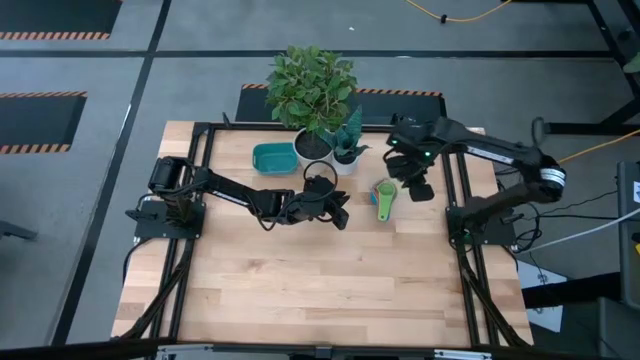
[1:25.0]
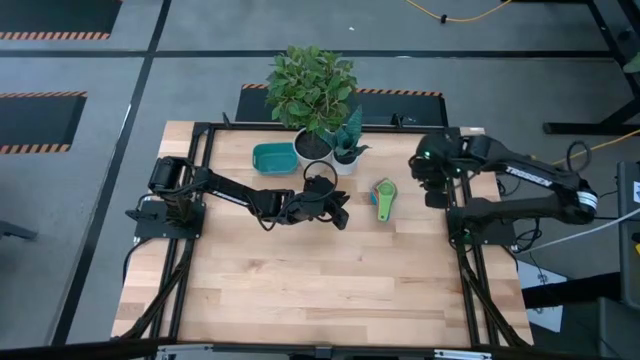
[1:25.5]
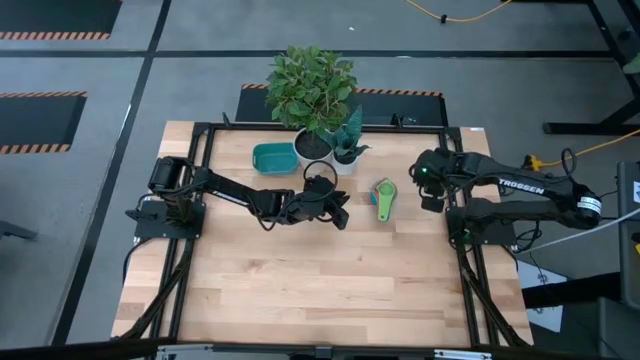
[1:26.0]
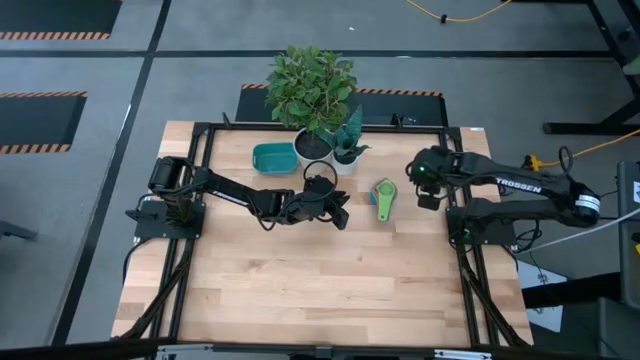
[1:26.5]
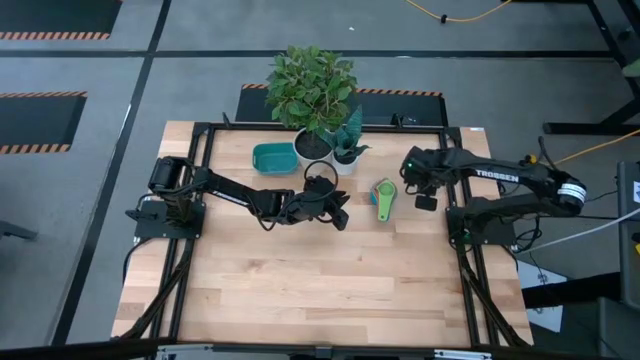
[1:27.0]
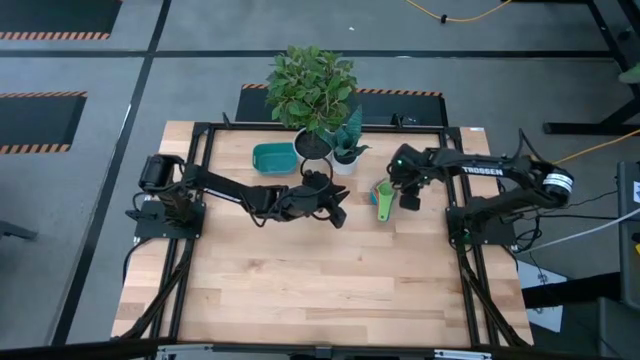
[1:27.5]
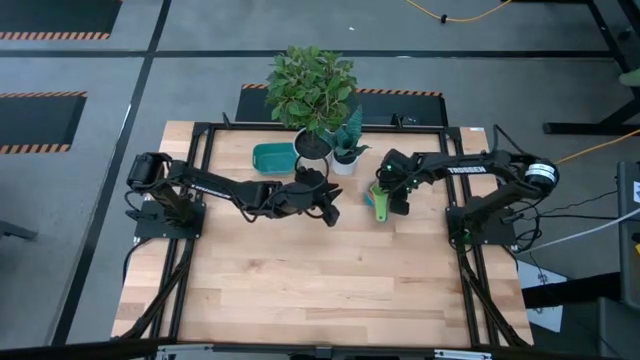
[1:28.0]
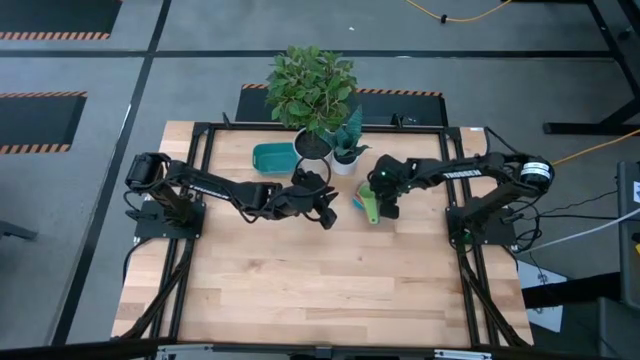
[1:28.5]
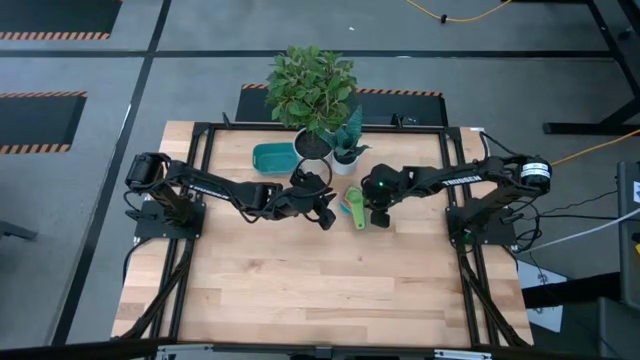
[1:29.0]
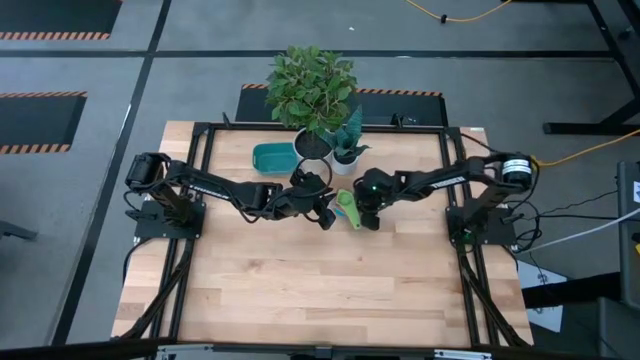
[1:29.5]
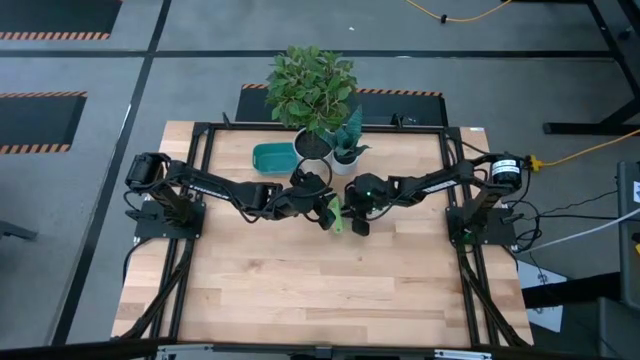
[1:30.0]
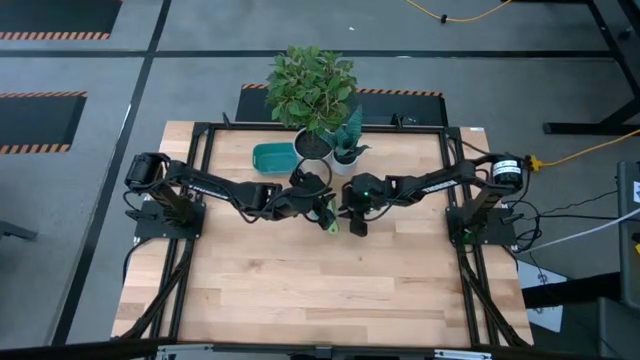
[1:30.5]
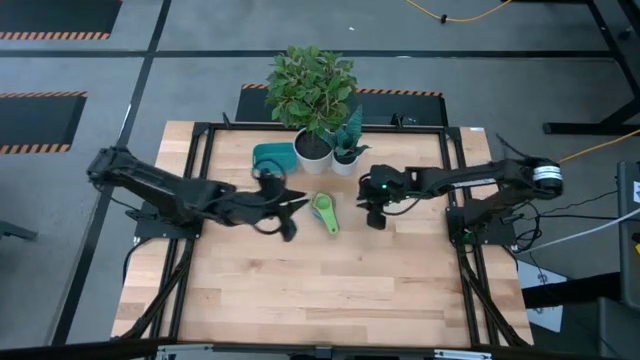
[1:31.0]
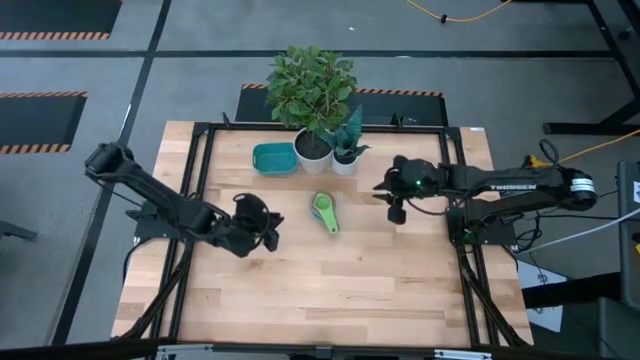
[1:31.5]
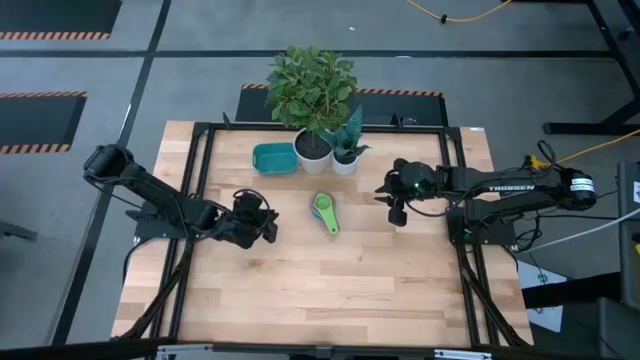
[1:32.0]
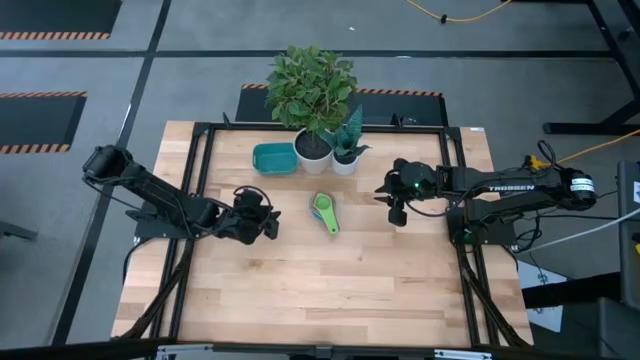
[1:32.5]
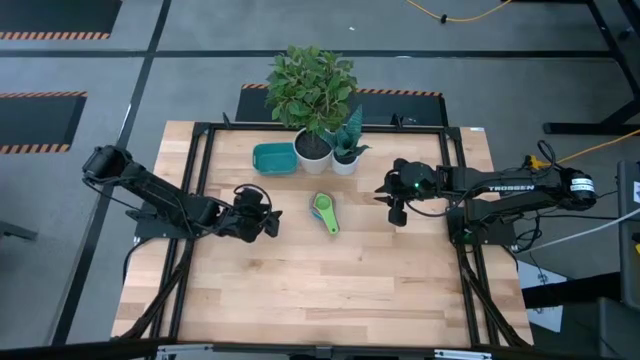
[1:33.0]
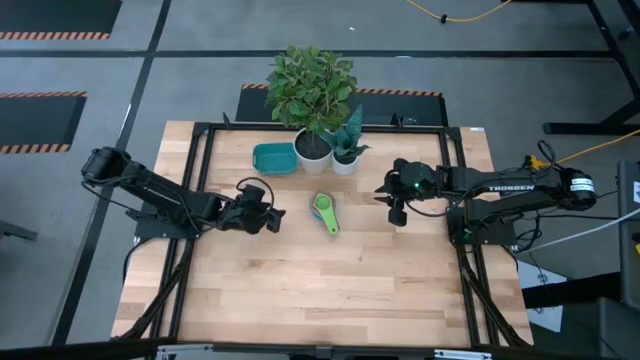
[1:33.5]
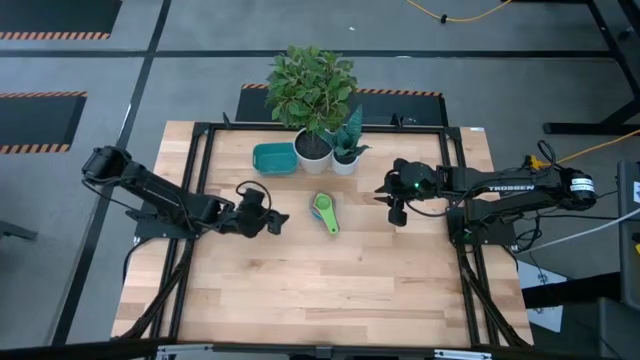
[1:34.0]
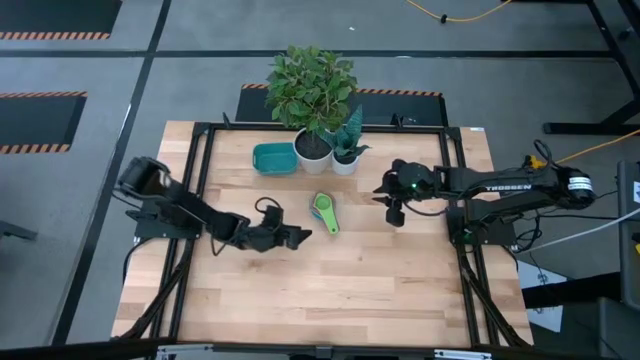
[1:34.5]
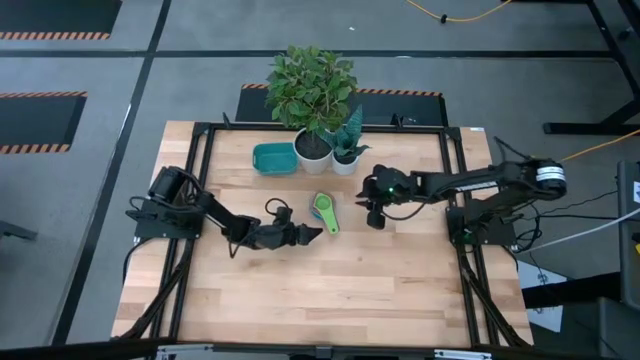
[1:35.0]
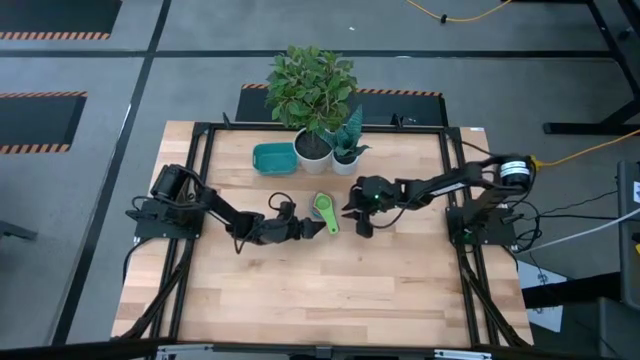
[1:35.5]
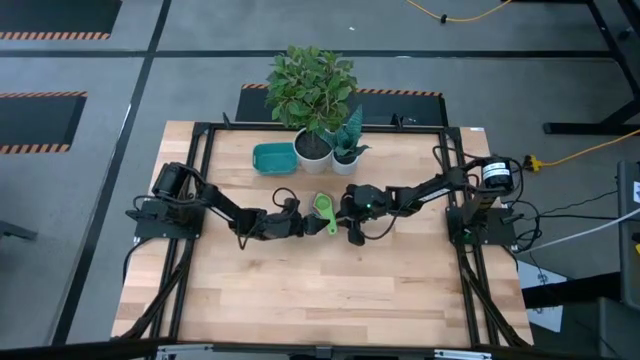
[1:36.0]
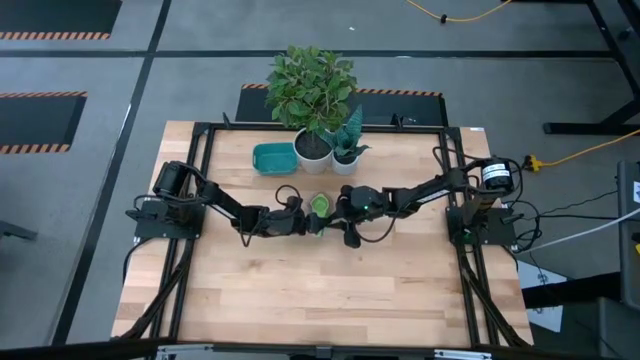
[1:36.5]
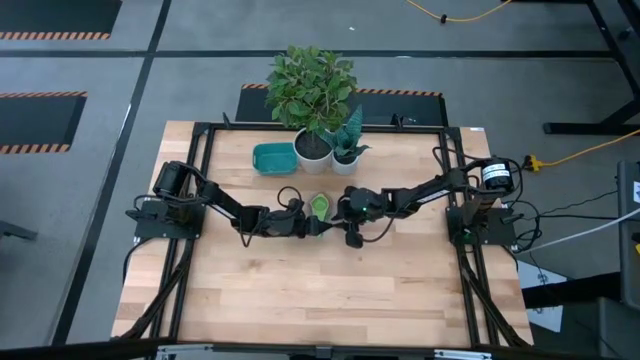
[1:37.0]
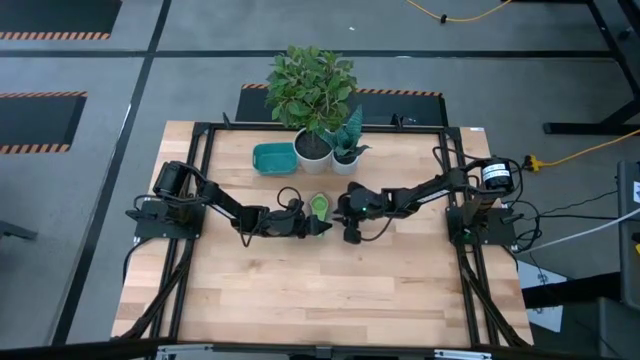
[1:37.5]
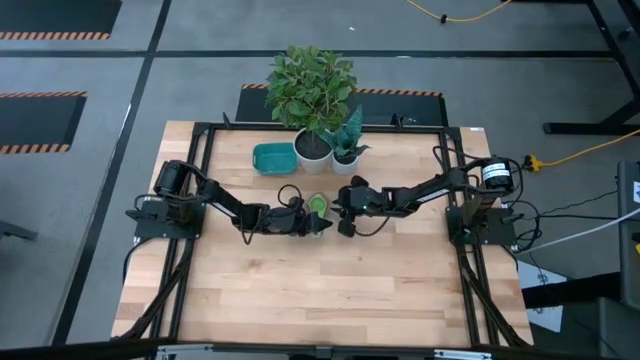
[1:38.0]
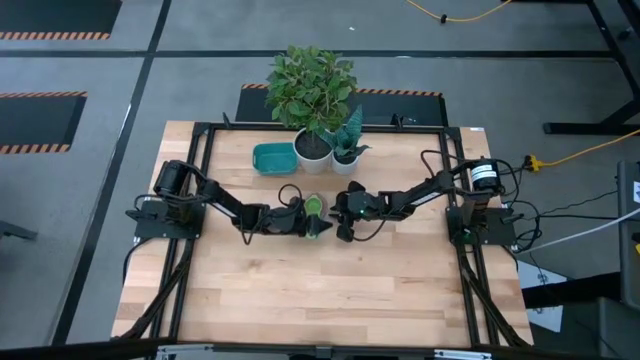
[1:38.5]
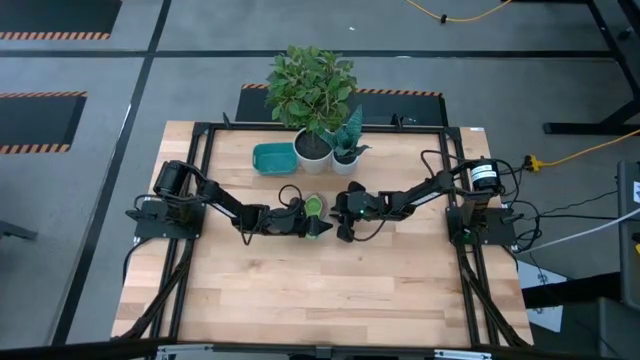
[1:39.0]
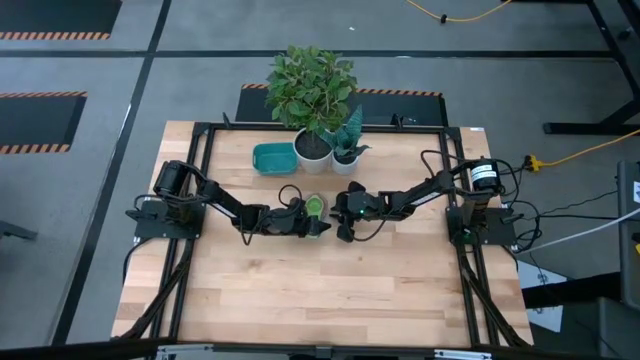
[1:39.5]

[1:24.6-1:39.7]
Task: Nest measuring cups in basket
Put the stacked measuring cup into the blue bin

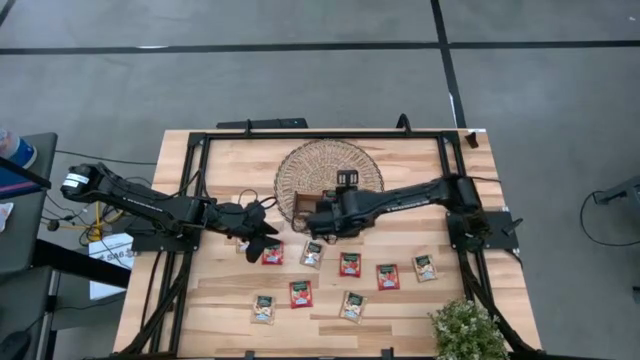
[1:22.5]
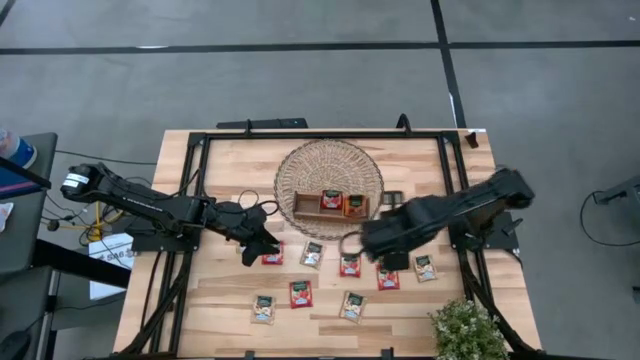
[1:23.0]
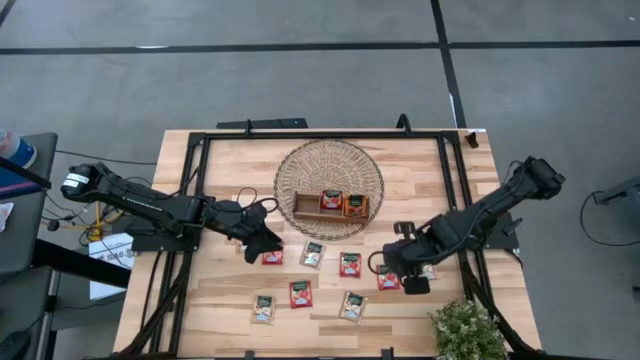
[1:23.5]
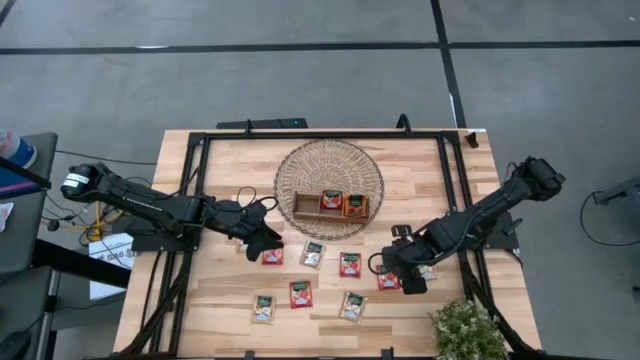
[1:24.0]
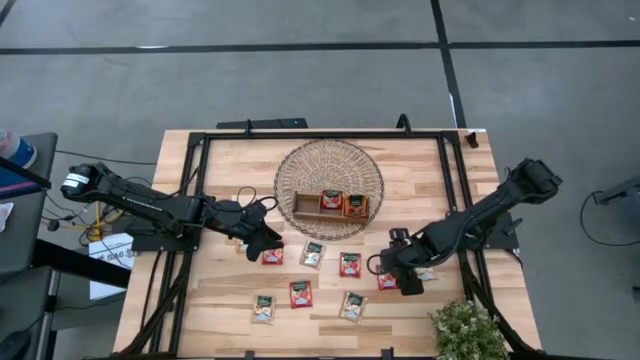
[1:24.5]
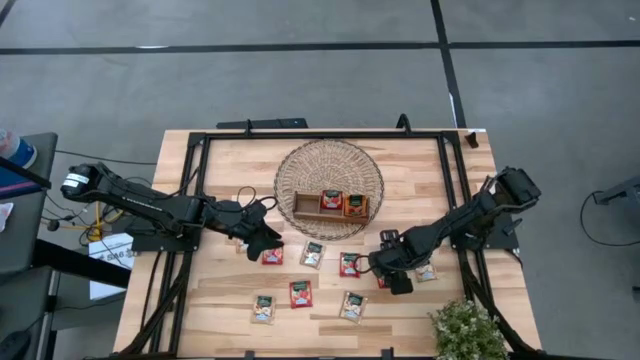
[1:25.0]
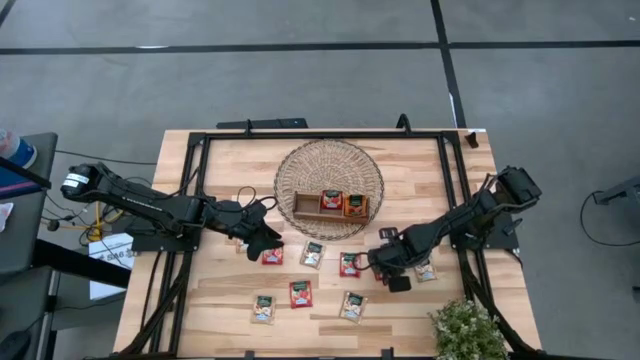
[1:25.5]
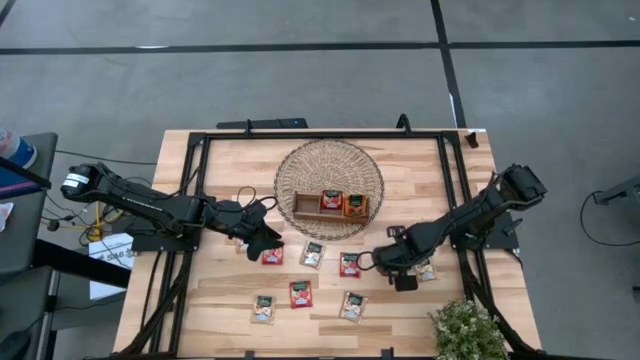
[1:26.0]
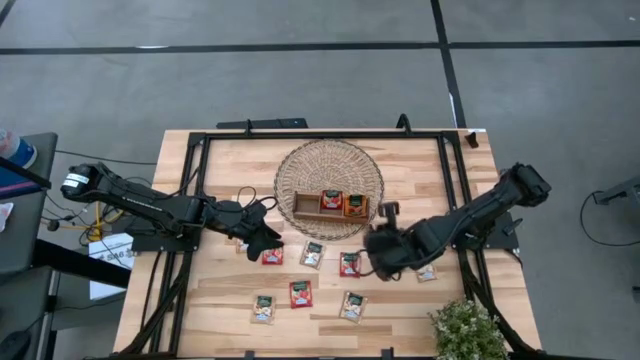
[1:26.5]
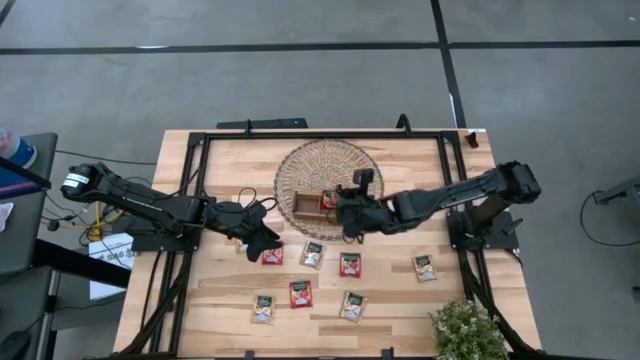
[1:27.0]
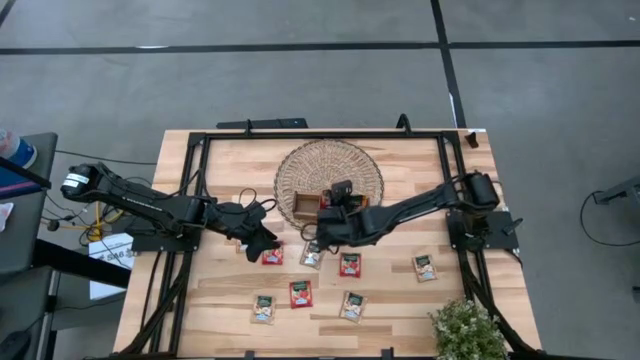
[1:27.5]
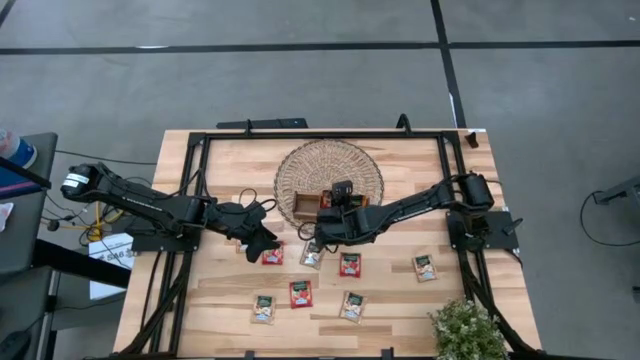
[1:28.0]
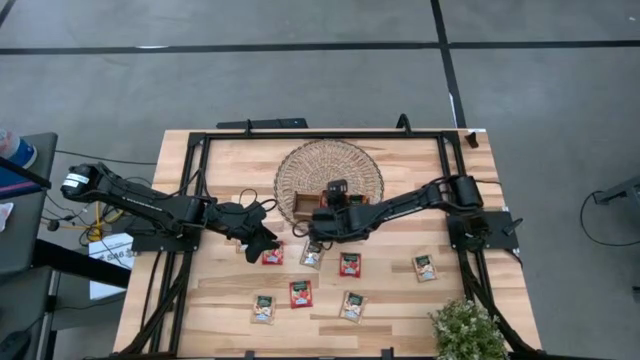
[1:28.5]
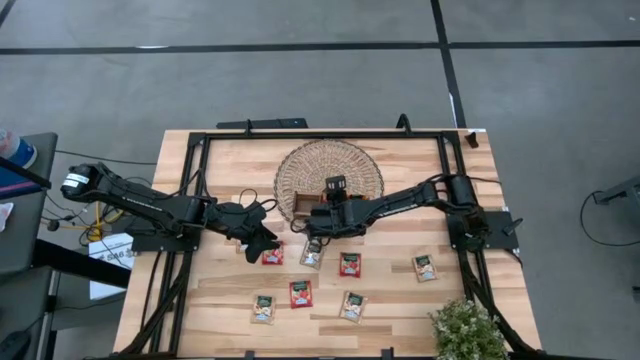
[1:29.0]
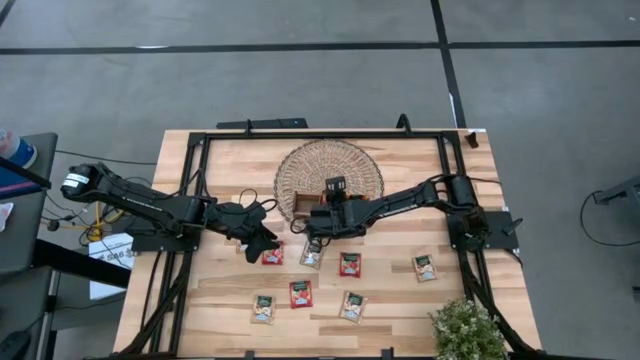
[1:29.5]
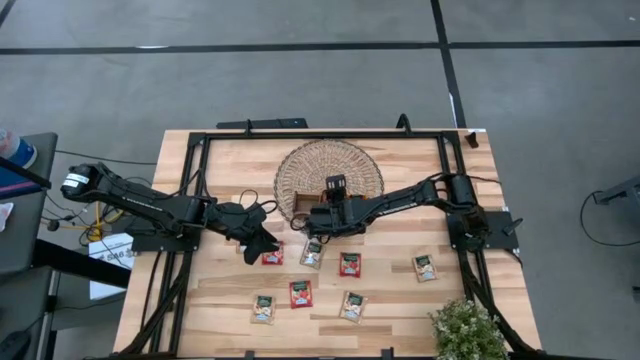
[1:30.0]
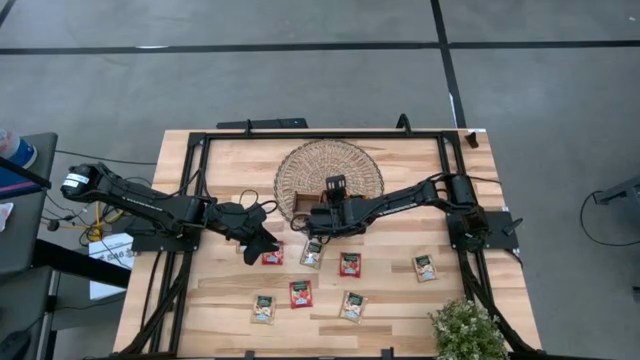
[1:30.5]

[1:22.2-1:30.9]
Task: Pick & Place Tea
Put the red tea bag into the middle section of the wooden organizer
